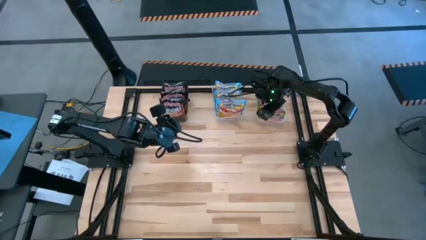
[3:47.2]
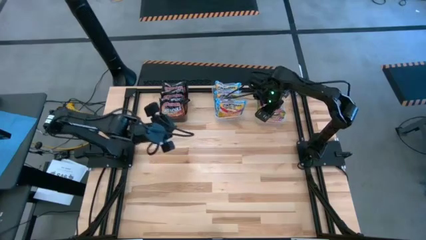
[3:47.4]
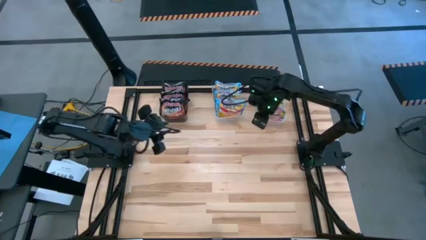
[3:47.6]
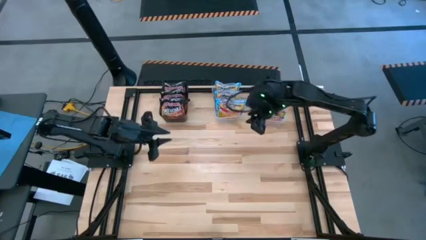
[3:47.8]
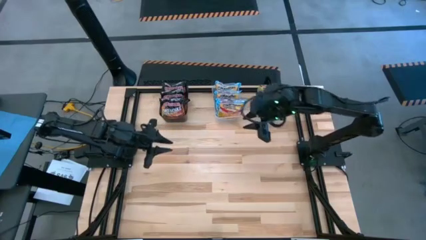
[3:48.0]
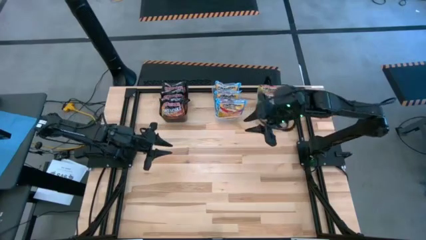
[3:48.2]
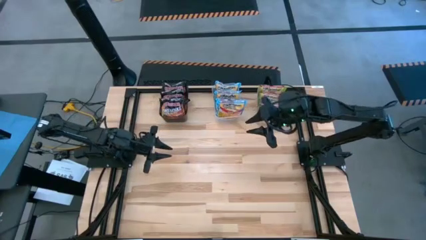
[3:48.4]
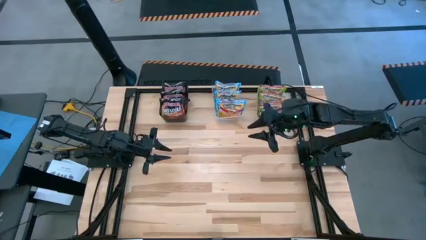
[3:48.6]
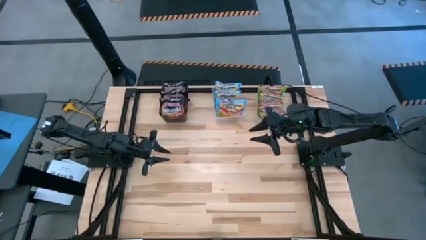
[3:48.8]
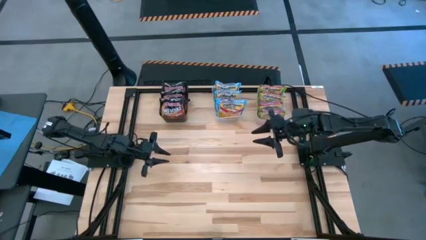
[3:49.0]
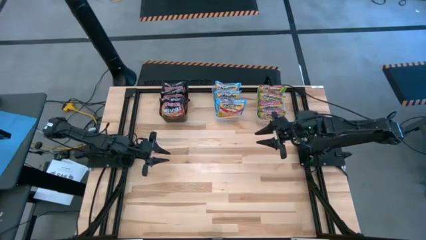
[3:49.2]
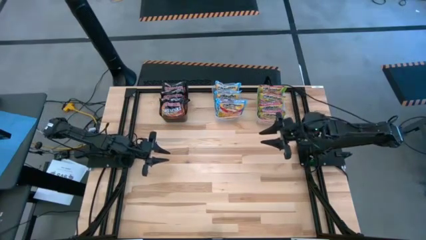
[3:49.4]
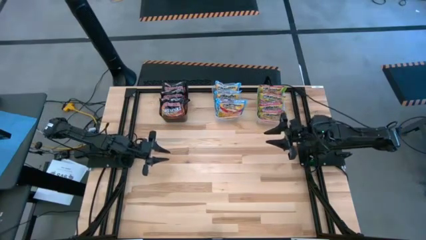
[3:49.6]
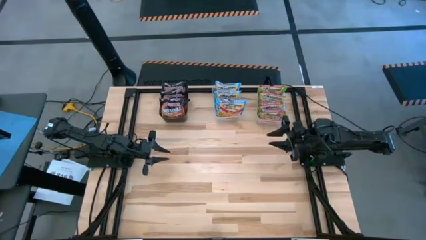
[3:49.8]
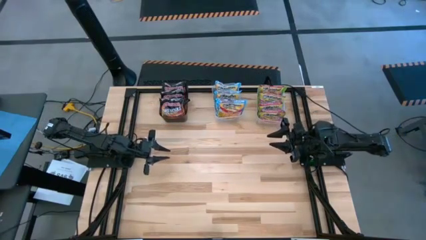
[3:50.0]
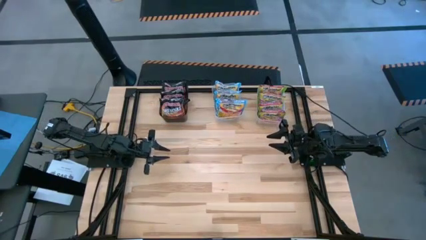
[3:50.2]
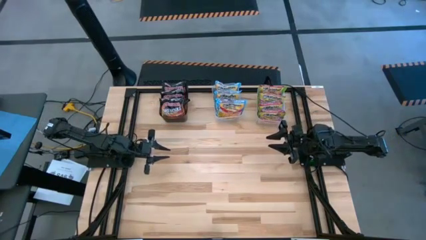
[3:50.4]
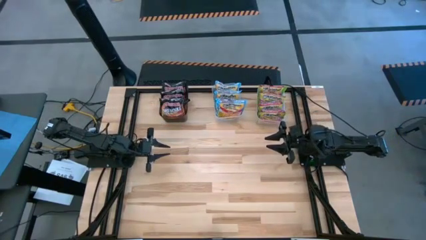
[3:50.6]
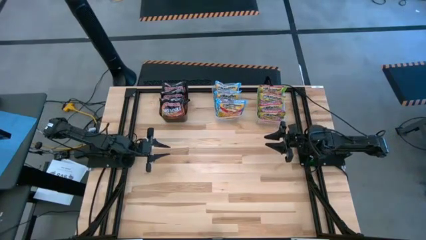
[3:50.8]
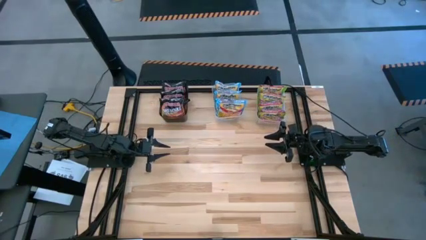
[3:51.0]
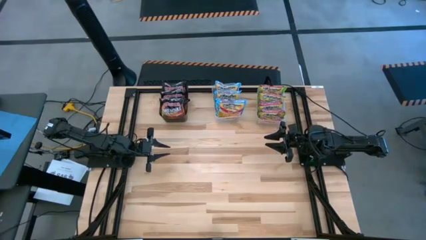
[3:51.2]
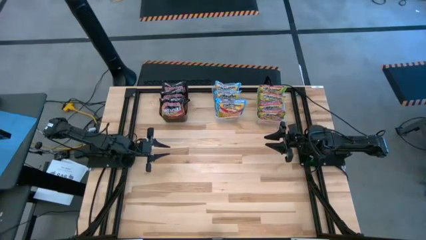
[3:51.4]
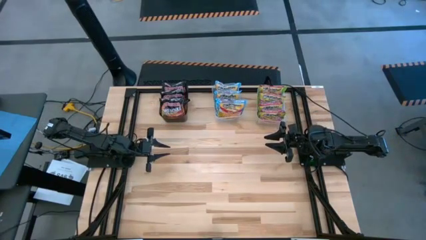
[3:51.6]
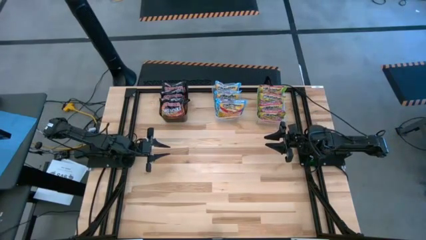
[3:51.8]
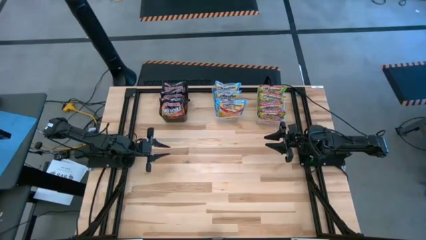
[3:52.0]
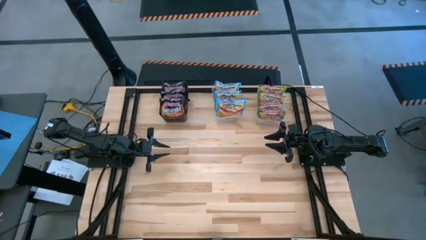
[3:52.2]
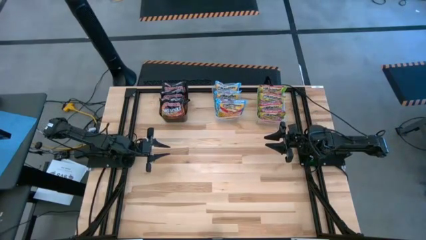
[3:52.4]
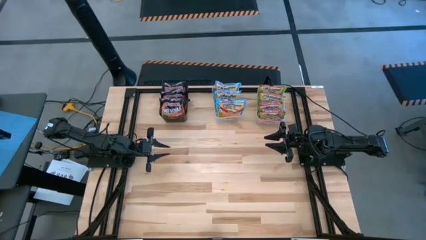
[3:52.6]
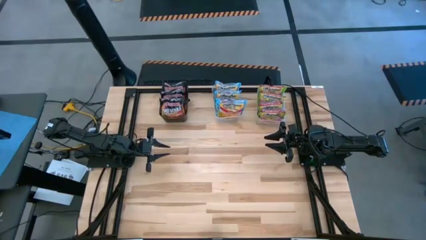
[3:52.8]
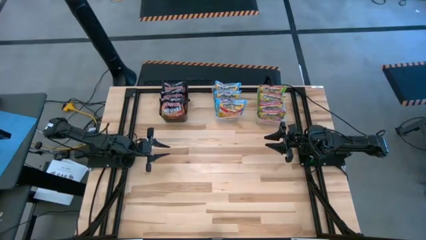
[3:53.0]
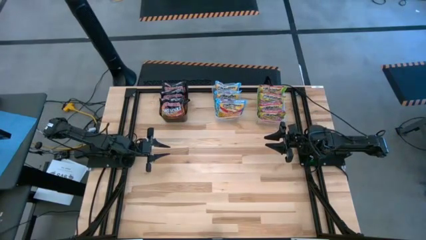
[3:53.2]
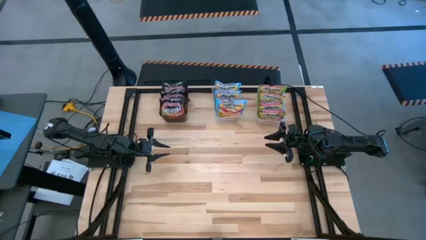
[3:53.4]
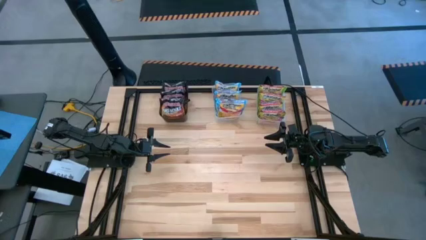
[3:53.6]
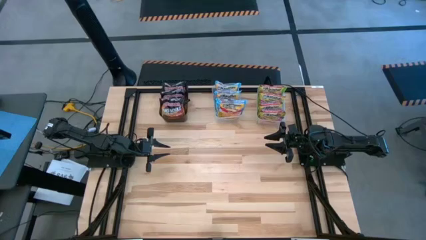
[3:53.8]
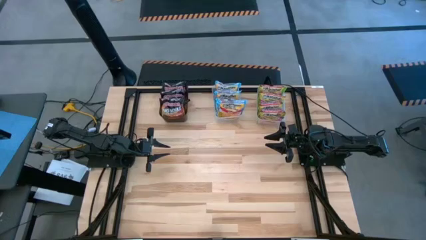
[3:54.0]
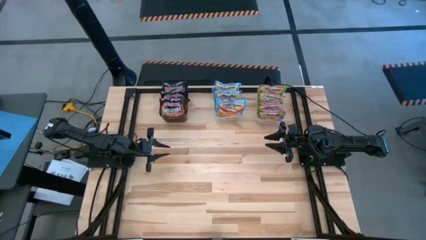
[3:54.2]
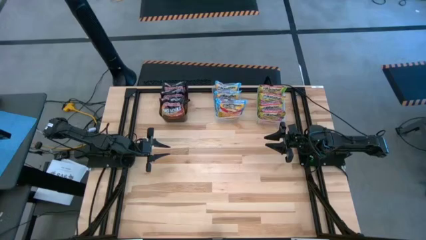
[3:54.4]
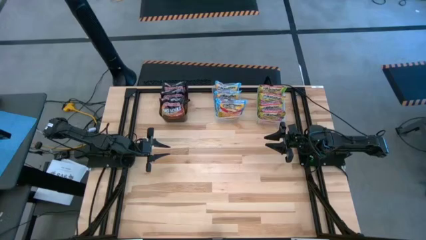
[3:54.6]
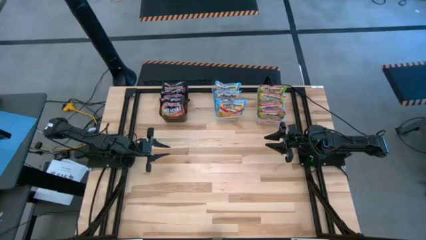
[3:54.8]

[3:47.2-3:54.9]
Task: Sort Maruchan noodles
Return to Home Position

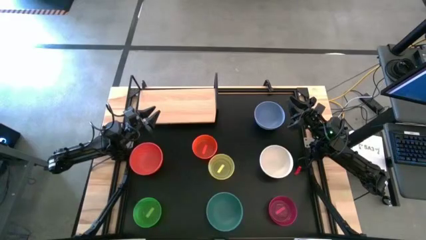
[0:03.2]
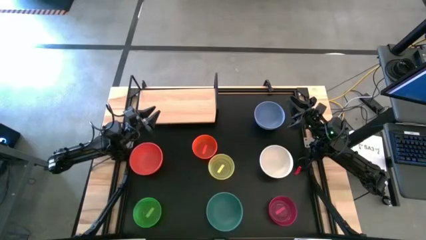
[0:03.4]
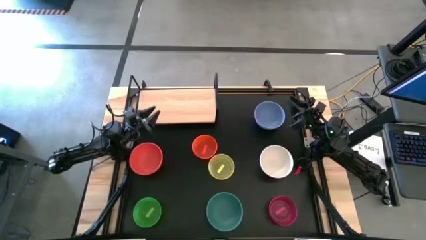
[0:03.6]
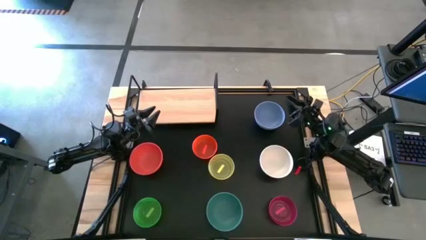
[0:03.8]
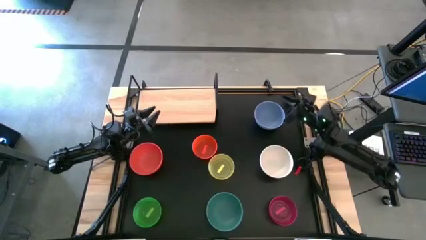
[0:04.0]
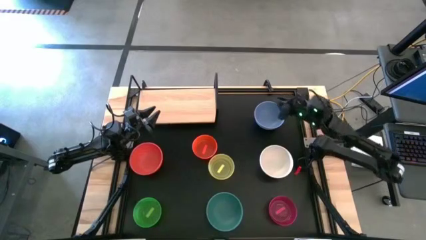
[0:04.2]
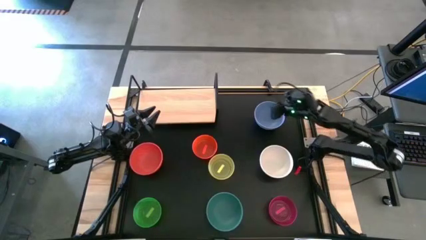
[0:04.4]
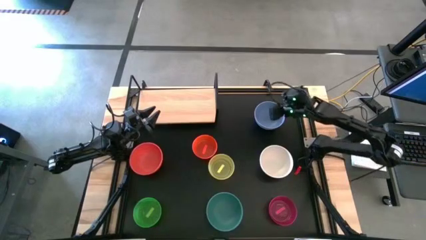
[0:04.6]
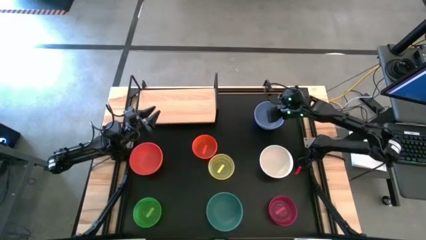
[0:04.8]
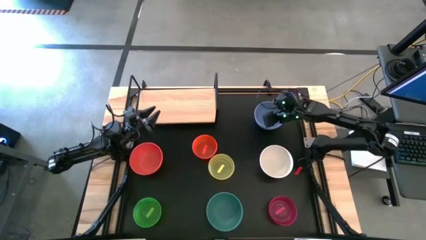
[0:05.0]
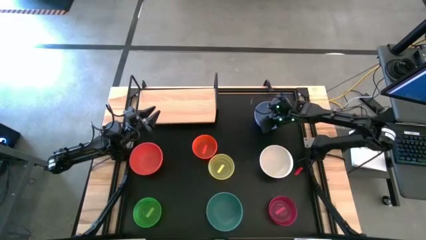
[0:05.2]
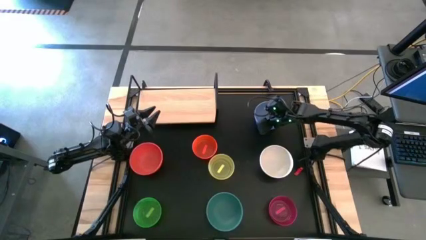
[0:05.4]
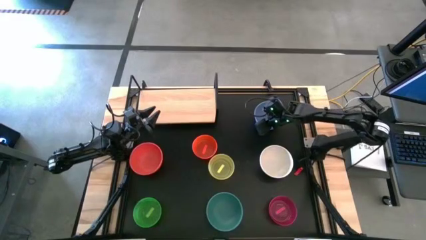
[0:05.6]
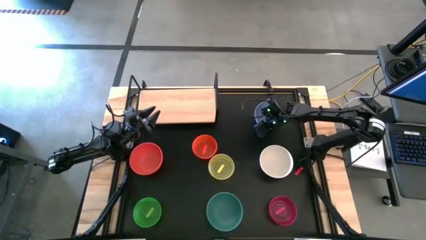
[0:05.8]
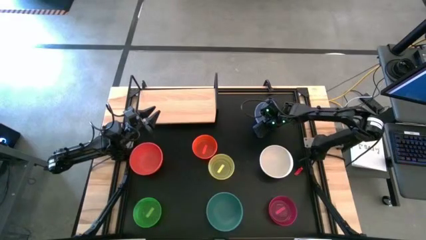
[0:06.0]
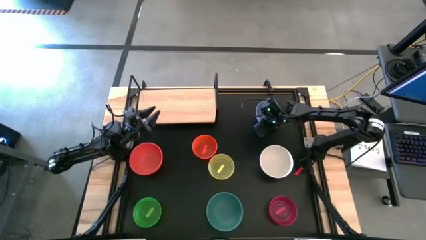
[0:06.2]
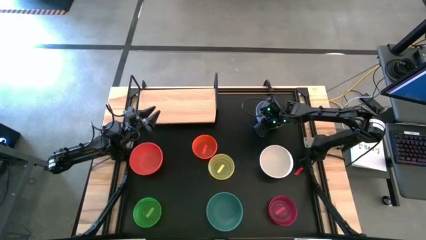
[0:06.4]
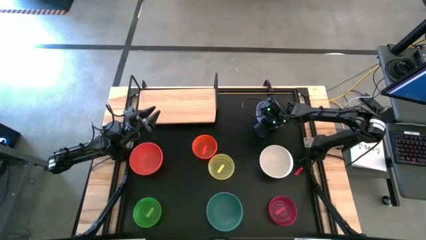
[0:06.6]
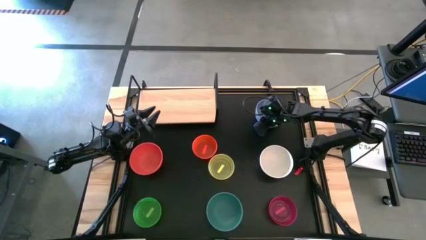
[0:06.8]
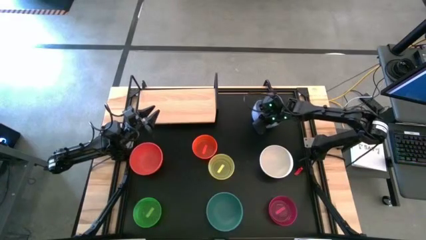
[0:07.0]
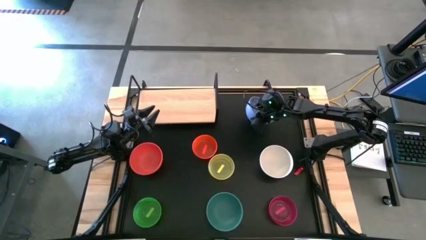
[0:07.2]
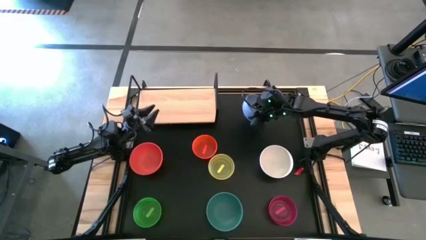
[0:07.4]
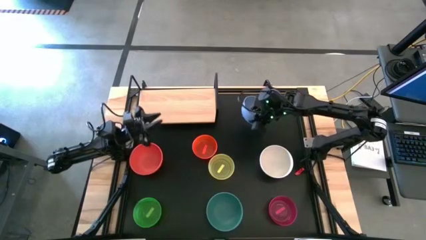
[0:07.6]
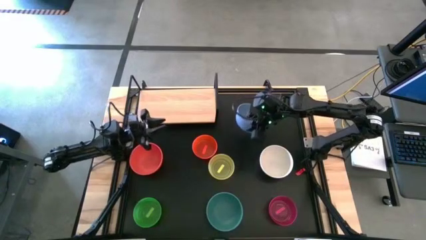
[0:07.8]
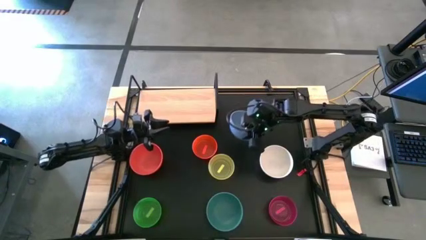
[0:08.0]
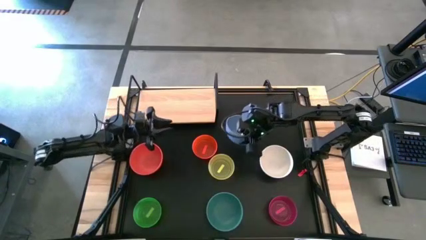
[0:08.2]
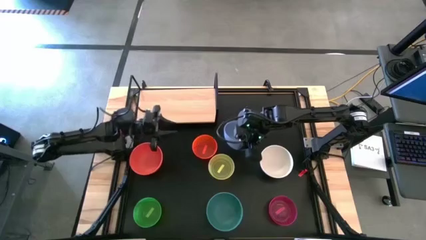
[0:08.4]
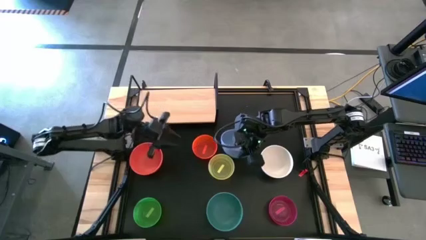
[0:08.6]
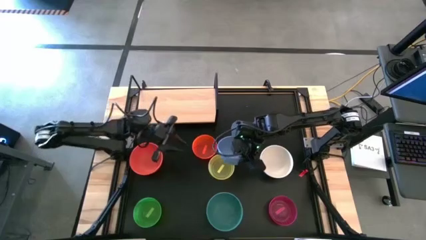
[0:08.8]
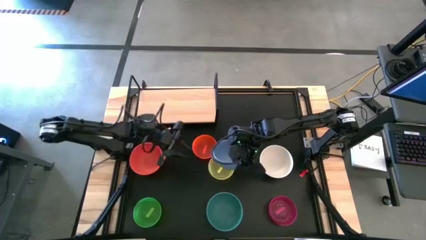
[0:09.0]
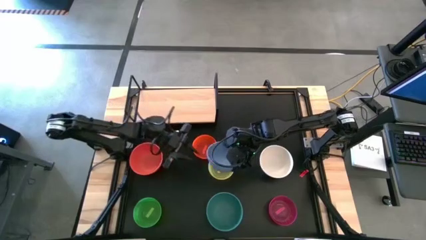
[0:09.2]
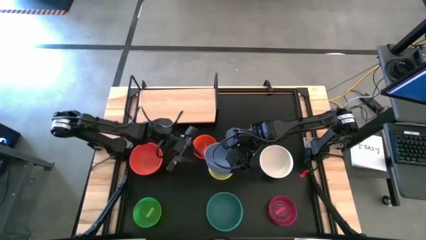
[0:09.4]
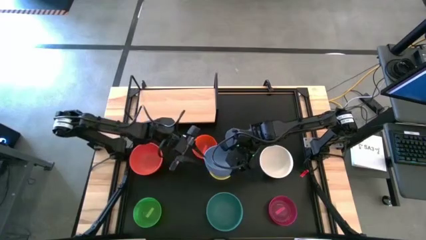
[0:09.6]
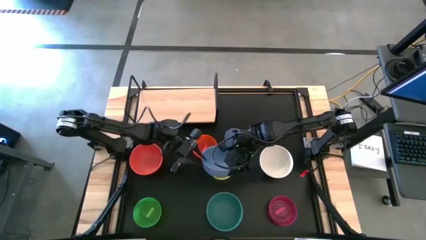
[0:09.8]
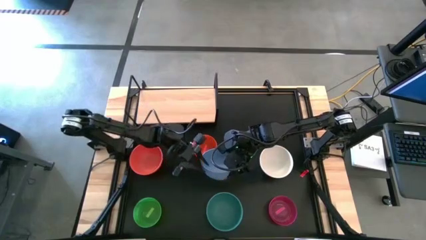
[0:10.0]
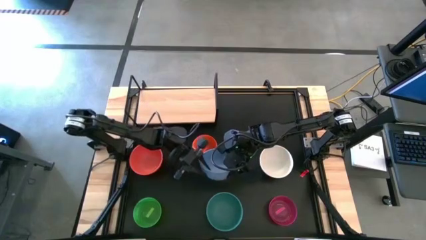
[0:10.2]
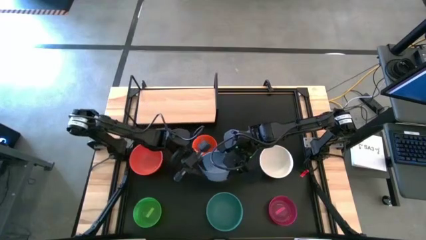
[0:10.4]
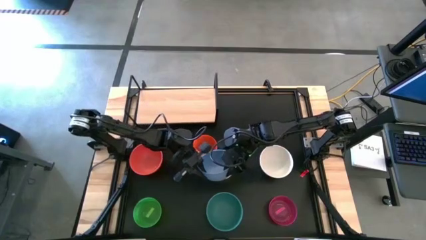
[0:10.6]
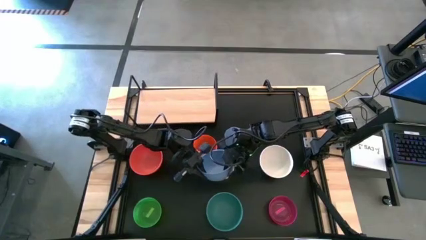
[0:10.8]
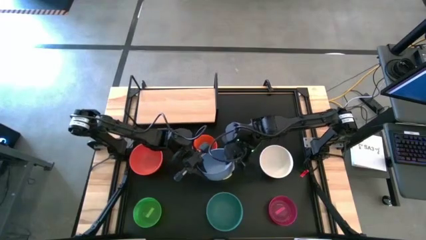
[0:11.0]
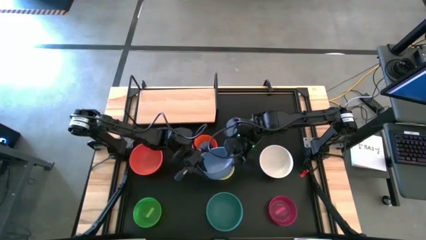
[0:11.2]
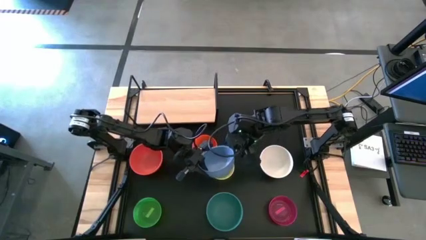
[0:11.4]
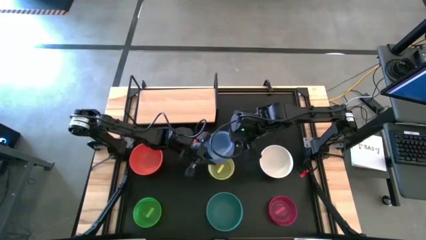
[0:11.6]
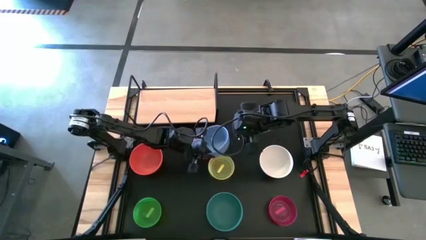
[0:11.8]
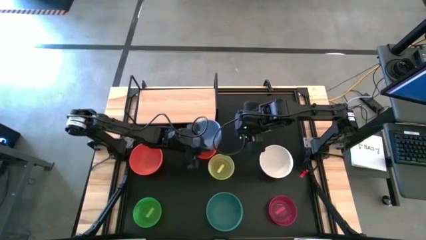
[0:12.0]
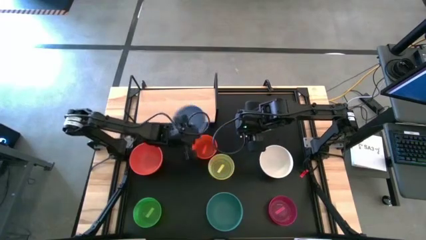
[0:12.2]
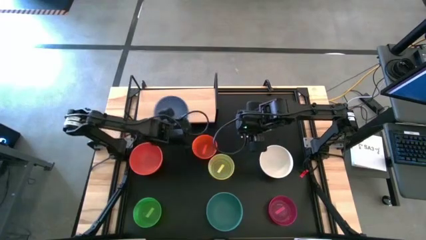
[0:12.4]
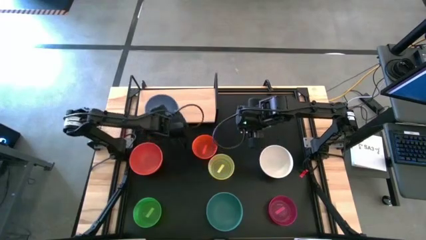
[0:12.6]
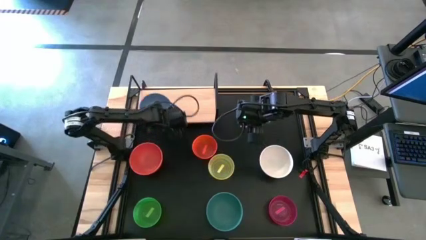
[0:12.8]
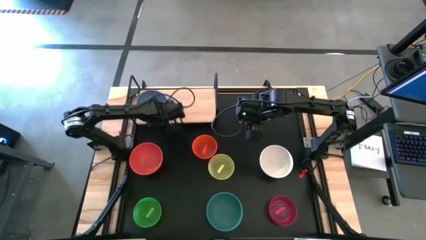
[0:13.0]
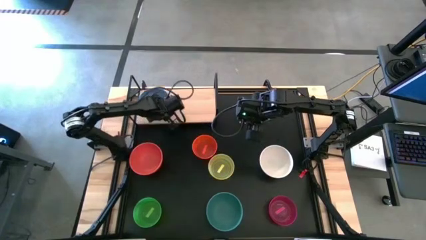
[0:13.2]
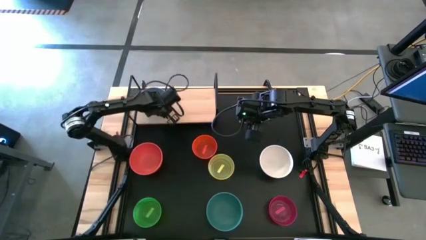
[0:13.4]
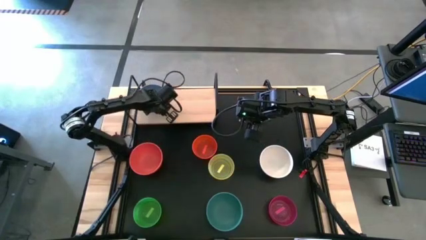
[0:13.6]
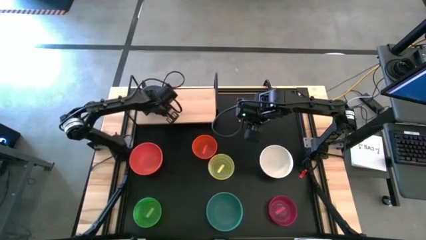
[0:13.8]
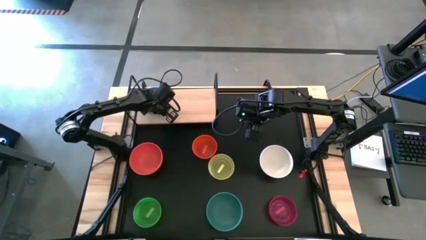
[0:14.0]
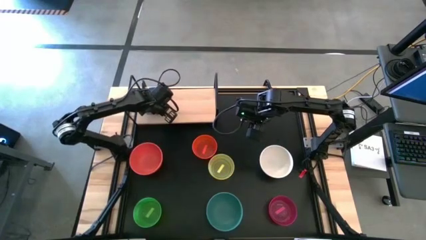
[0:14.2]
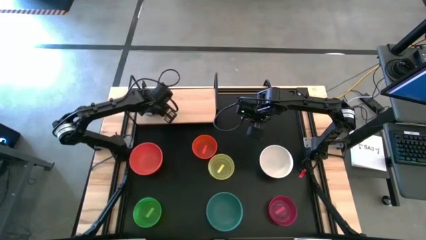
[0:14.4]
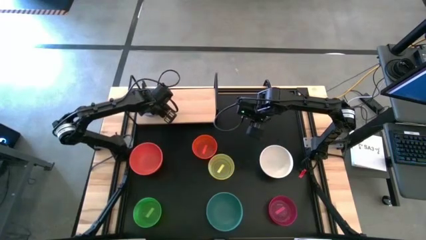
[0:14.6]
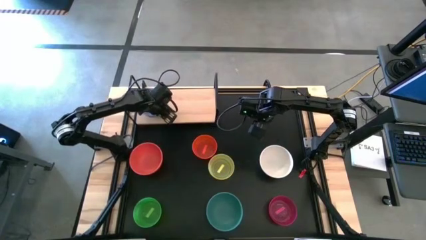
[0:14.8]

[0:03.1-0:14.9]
Task: Place and stack bowls onto a shelf
Put the blue bowl on the shelf
